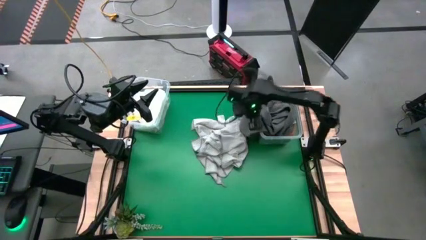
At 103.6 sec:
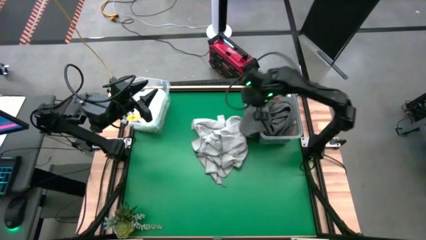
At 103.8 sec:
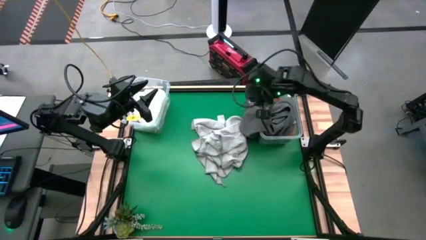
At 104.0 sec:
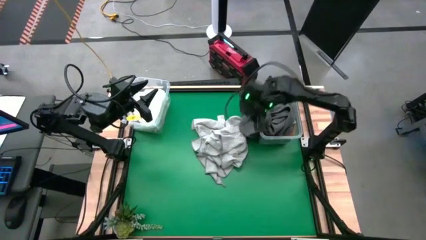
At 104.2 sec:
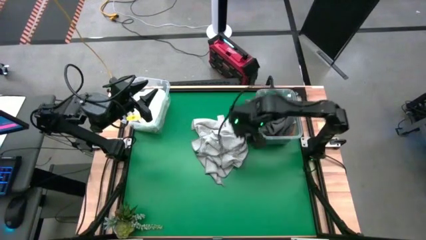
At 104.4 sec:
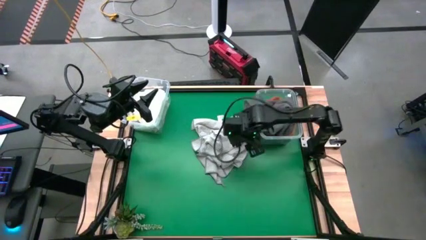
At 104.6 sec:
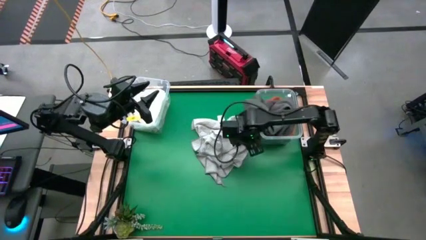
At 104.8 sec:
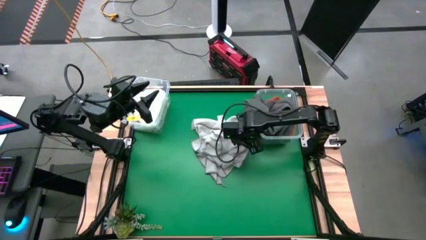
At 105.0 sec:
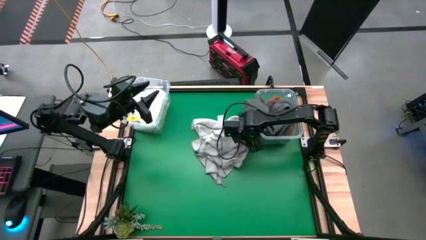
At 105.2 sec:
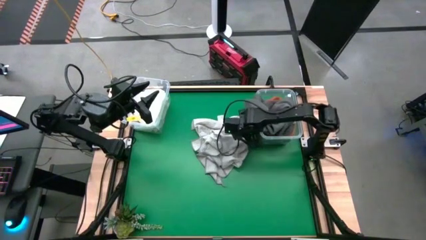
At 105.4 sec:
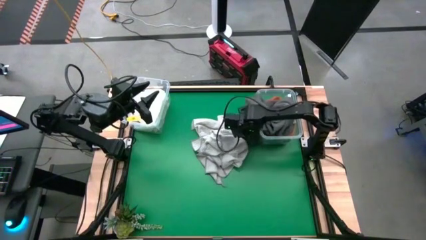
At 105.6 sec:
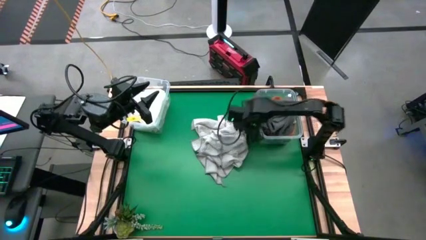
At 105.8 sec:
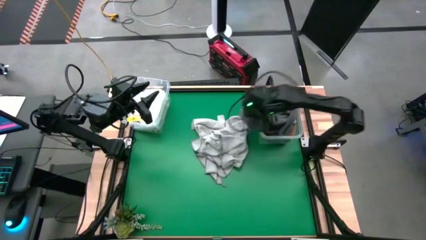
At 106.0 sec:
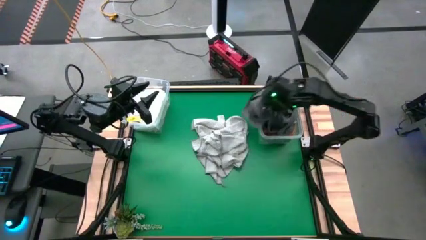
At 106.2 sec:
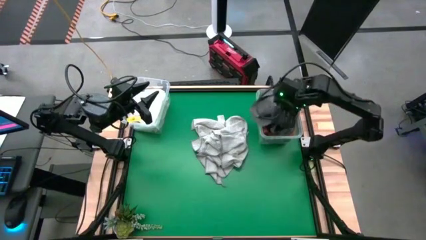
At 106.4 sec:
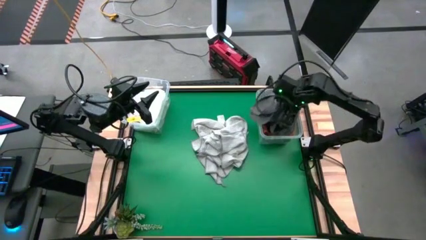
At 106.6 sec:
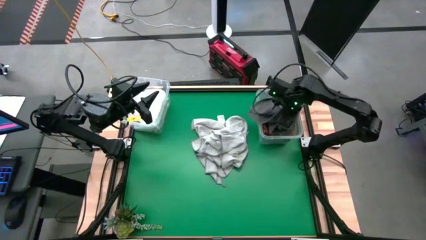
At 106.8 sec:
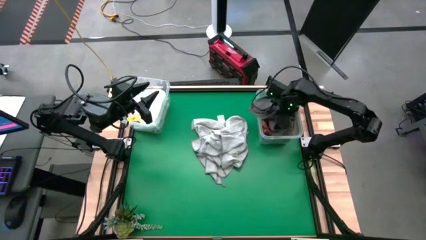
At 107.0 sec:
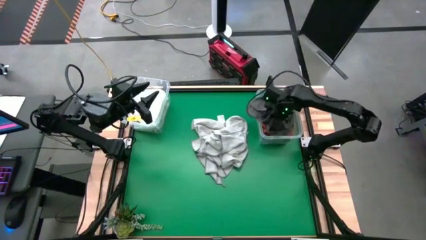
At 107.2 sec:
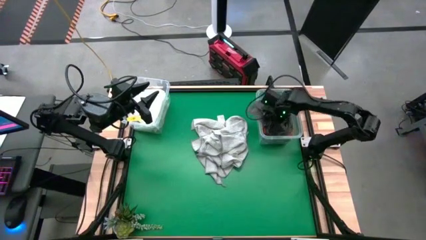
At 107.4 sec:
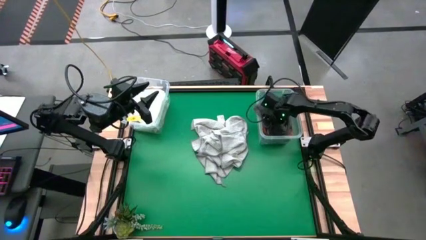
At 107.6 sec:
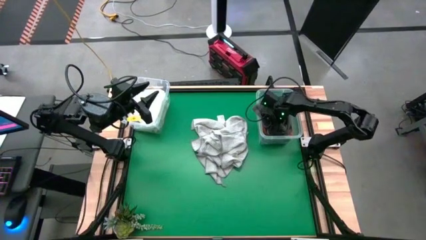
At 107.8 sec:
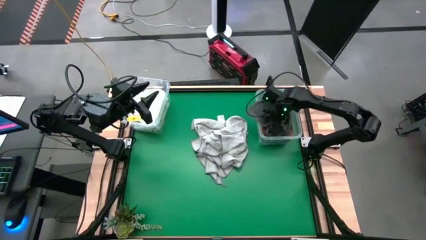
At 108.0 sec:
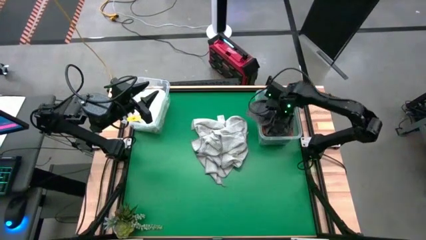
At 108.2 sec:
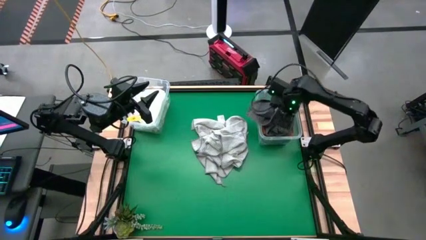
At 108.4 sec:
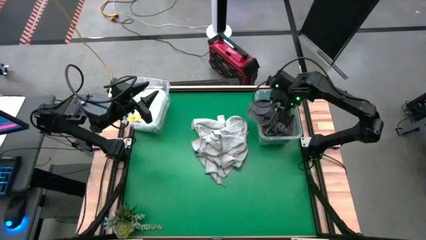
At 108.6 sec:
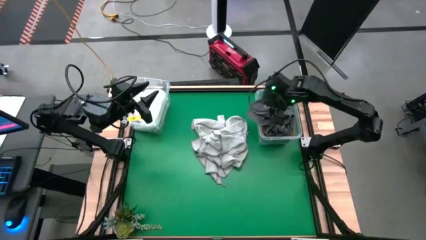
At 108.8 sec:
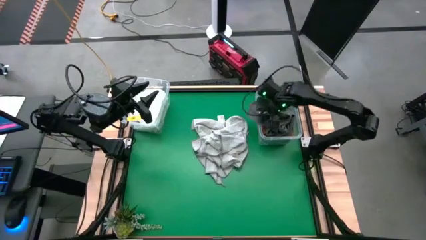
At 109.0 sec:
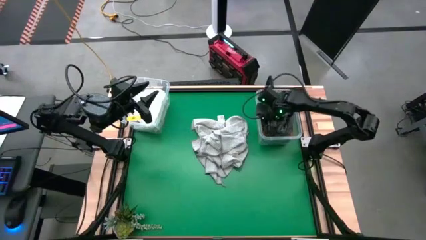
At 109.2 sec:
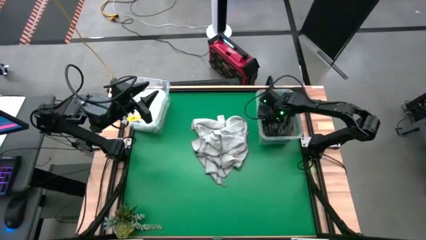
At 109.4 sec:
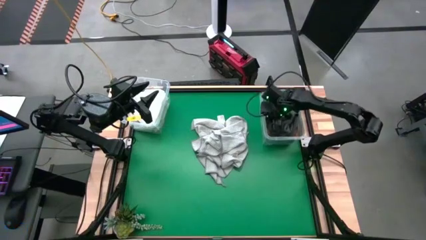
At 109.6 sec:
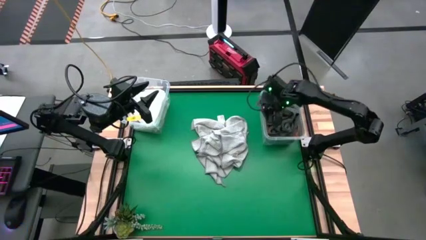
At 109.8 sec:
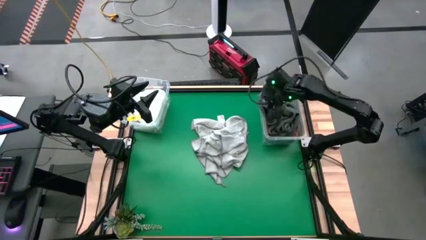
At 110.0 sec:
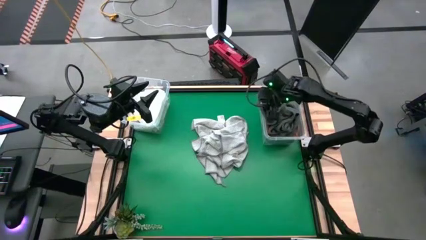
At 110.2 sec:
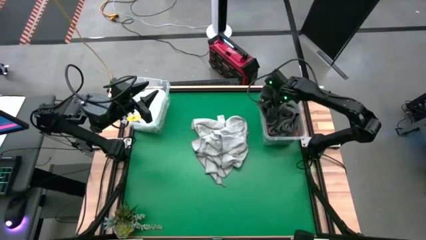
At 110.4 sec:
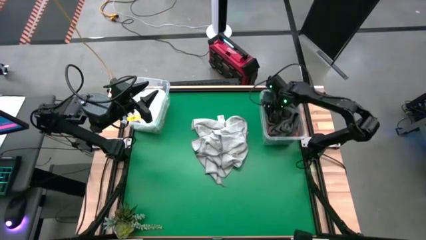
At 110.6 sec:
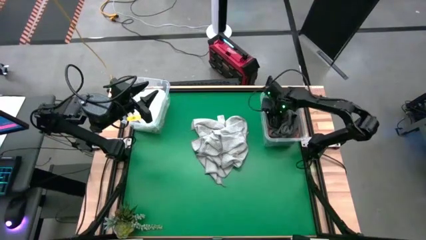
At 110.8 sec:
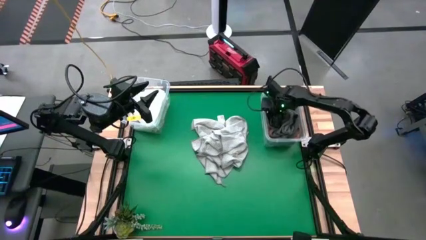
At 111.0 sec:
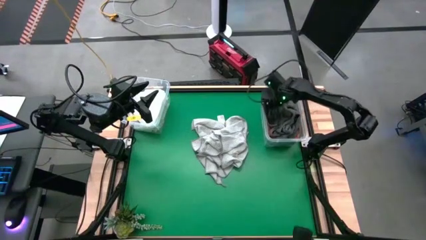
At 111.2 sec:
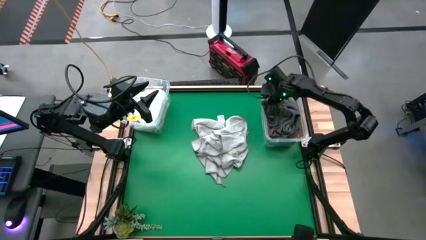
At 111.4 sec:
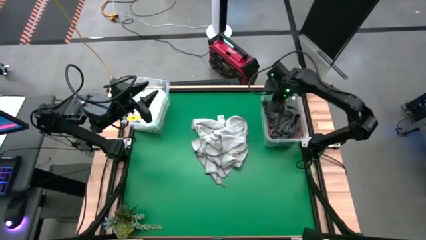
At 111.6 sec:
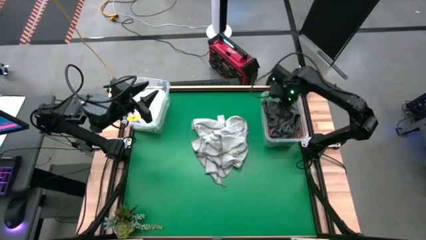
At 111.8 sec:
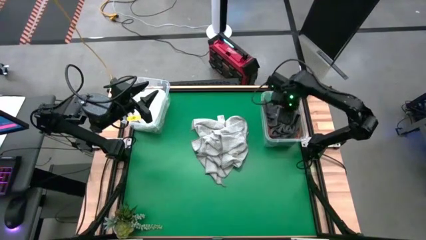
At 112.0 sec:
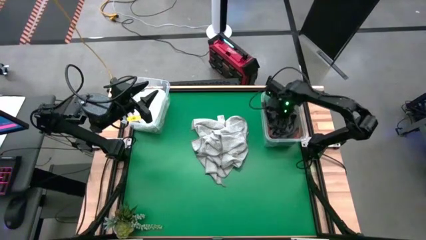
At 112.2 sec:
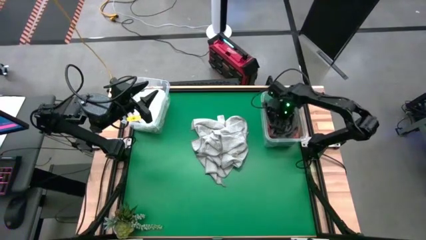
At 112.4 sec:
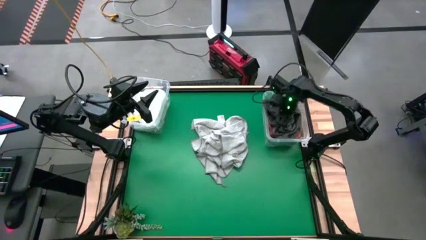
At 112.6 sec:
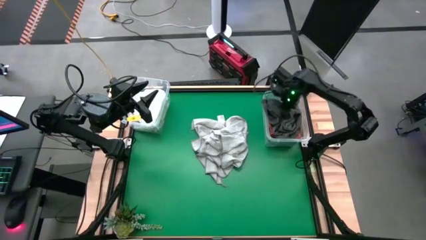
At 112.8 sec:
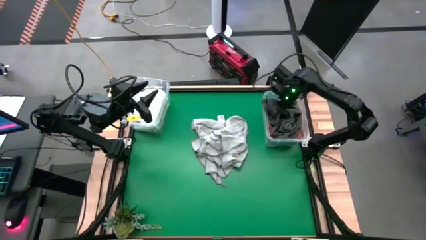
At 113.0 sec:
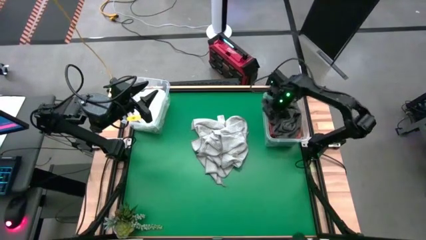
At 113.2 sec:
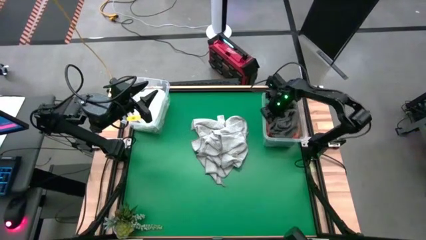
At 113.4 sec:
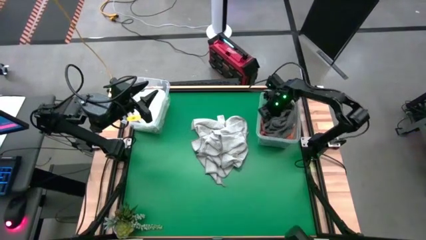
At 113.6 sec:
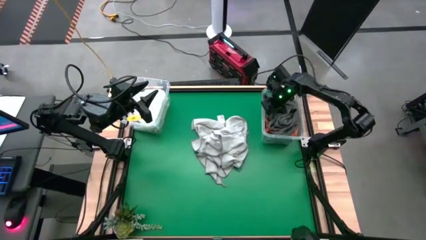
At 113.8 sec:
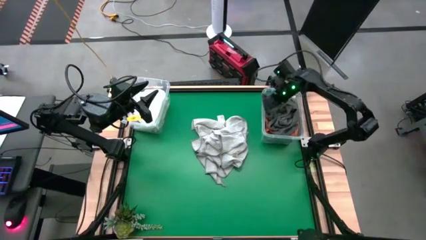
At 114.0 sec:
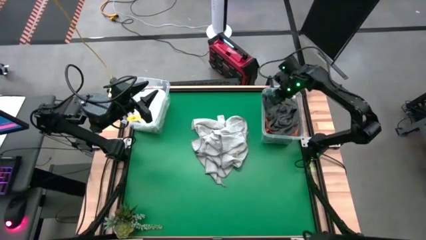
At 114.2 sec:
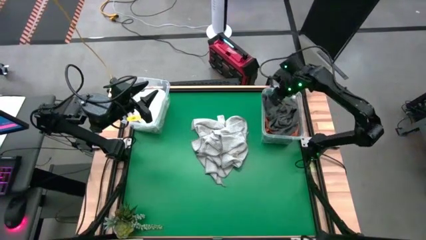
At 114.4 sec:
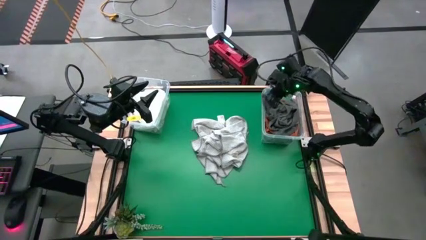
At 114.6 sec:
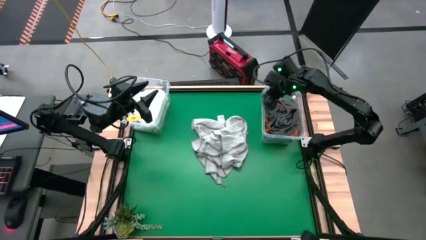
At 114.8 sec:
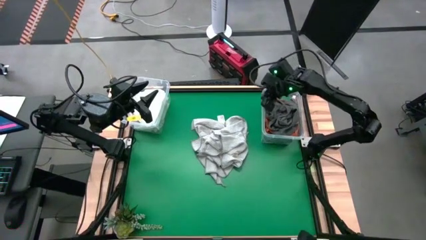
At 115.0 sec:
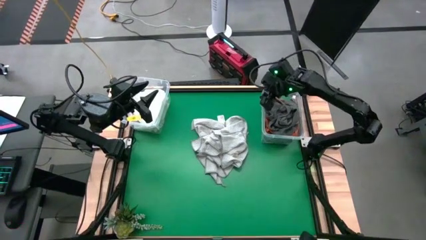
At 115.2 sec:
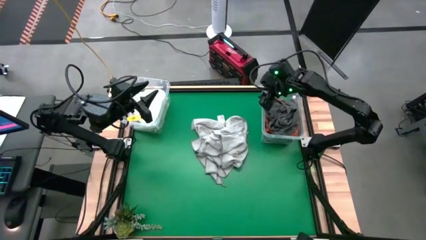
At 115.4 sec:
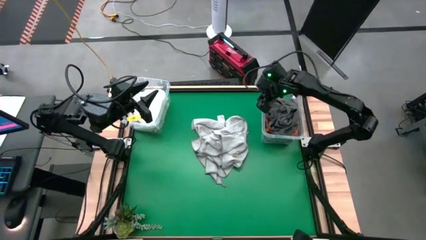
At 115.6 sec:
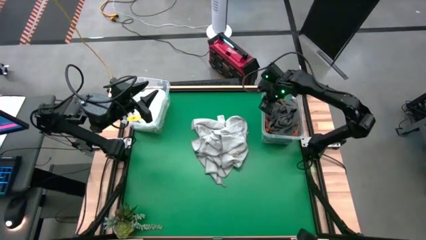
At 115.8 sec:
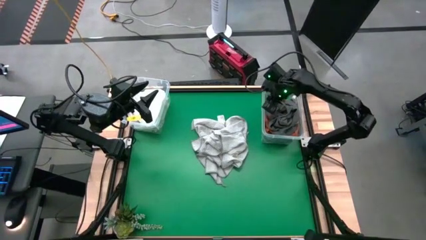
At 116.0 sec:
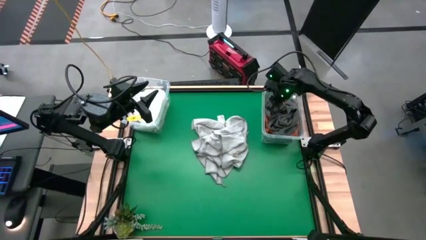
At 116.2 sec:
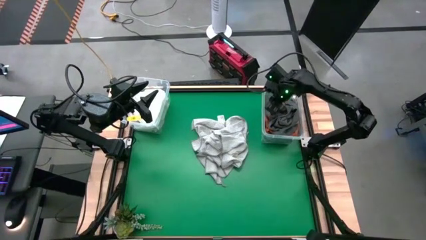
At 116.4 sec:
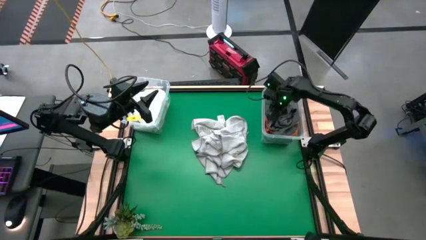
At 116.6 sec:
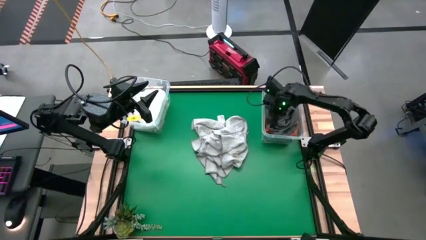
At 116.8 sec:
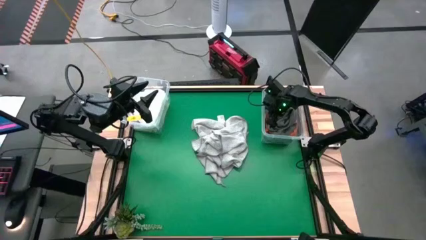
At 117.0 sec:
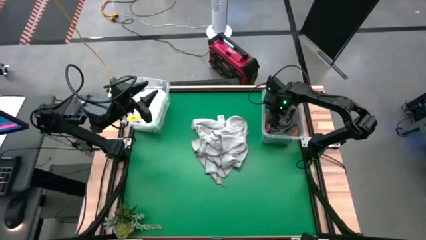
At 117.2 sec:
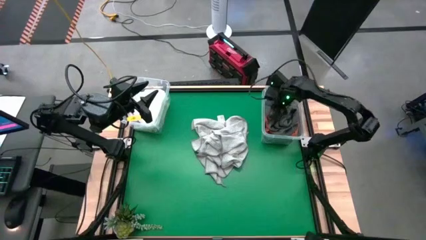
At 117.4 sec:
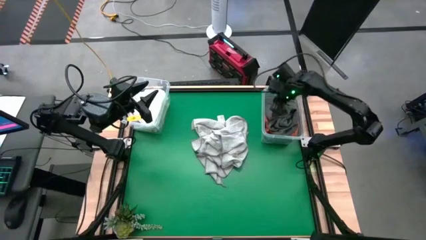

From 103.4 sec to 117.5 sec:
Task: Sort towels by color in basket
Put the gray towel into the right transparent bin

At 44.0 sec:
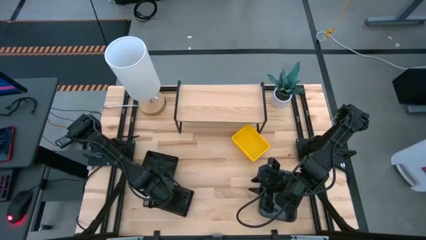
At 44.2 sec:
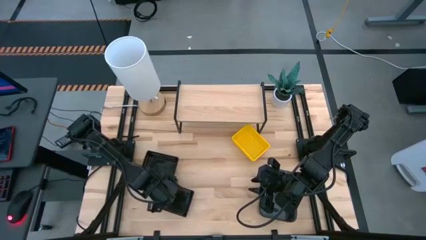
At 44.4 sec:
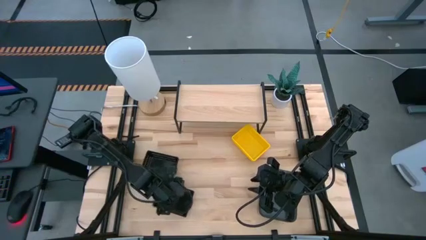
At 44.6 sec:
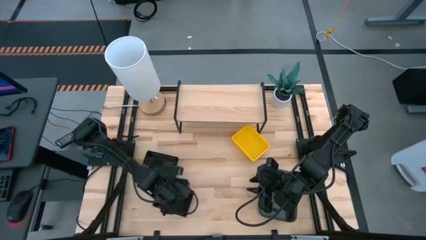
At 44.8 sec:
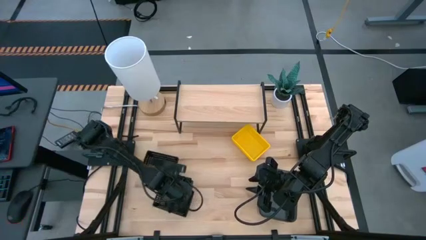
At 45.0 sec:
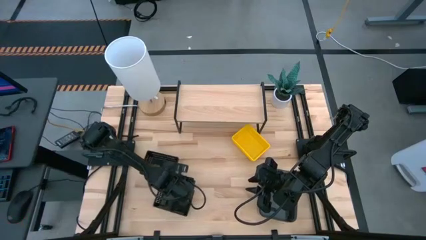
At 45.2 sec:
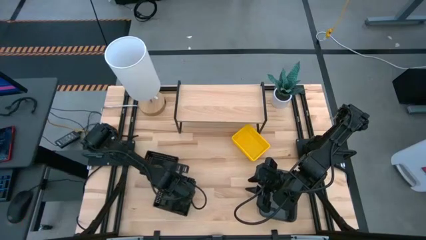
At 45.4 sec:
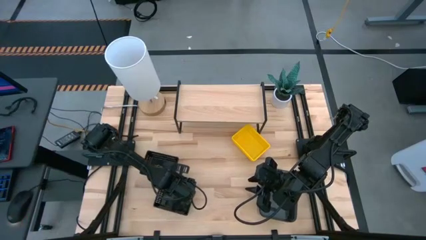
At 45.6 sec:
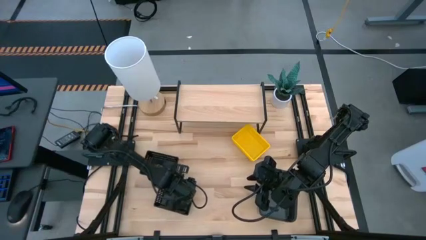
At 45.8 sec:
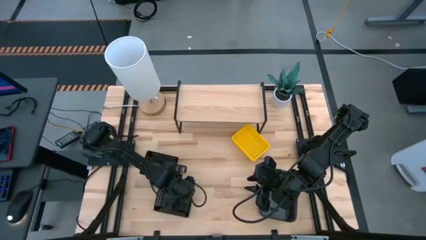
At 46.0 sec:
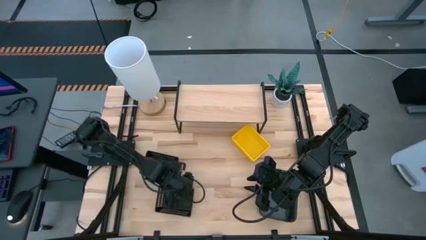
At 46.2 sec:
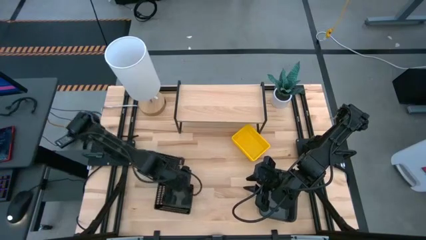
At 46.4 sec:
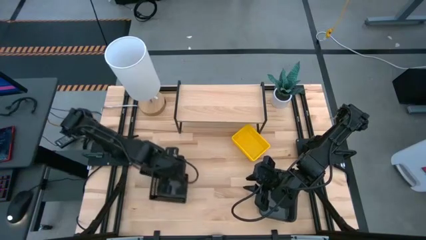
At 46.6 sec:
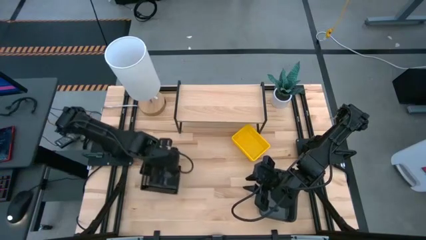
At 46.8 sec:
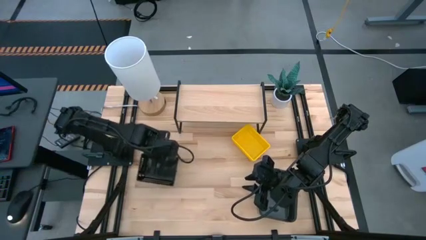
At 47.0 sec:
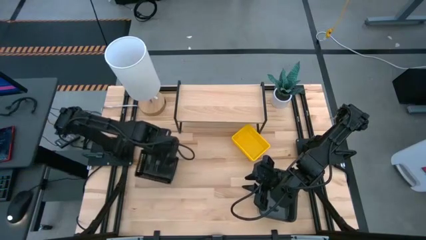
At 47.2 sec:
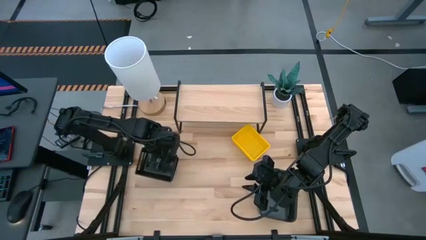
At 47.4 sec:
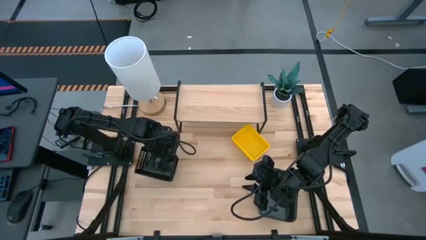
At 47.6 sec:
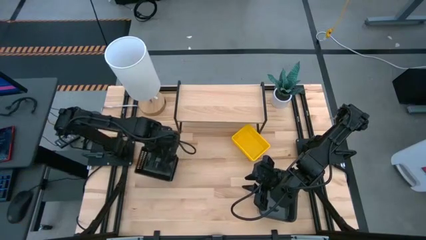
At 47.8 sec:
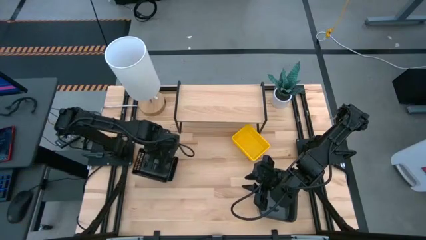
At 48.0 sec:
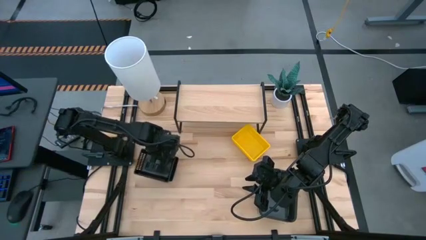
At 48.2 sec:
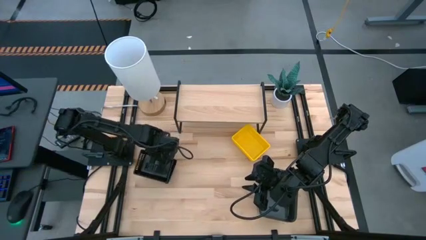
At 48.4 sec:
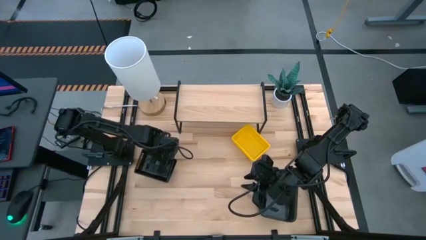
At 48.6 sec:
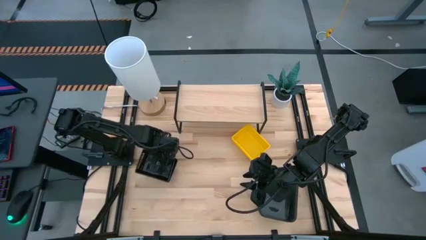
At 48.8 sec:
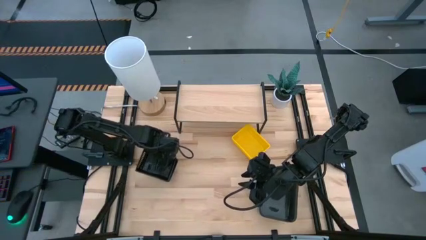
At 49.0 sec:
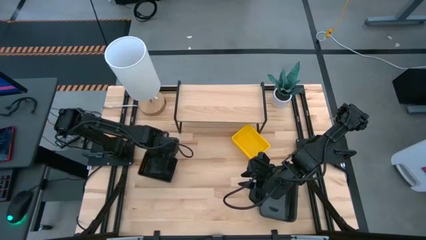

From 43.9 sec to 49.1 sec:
Task: Stack baskets on shelf by color
Stack the bottom black bin on top of the top black bin
